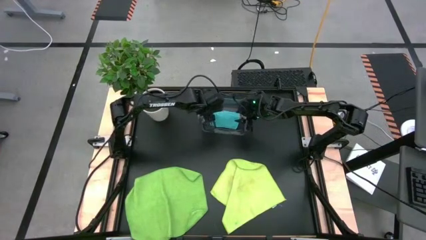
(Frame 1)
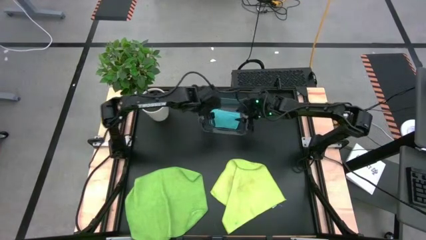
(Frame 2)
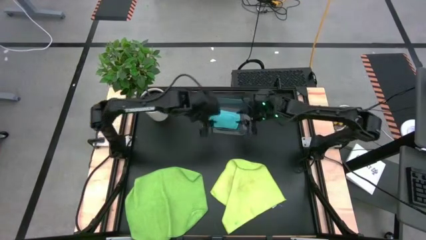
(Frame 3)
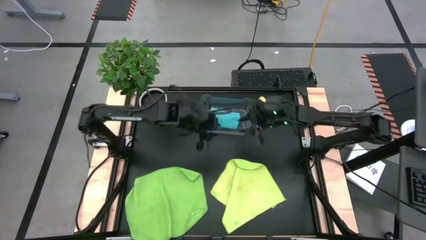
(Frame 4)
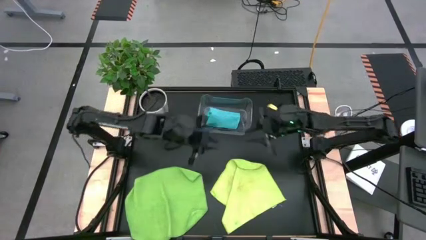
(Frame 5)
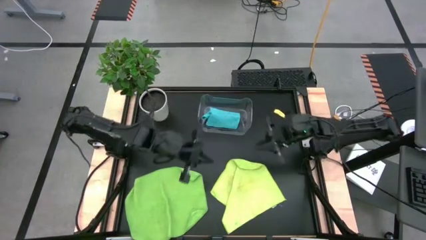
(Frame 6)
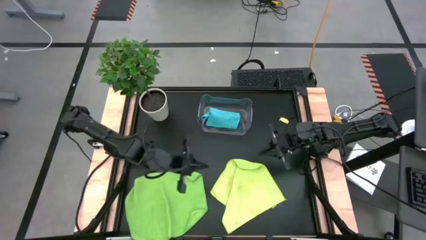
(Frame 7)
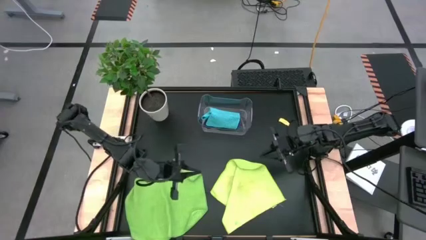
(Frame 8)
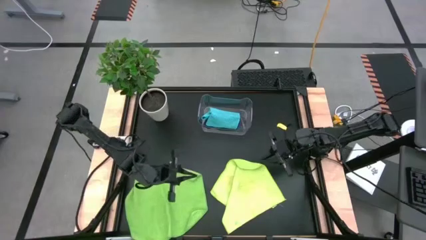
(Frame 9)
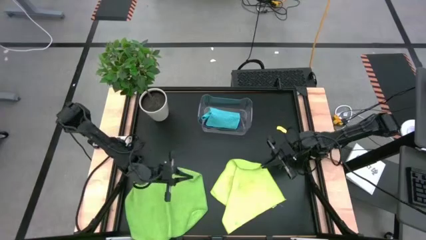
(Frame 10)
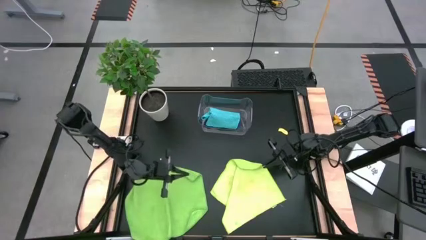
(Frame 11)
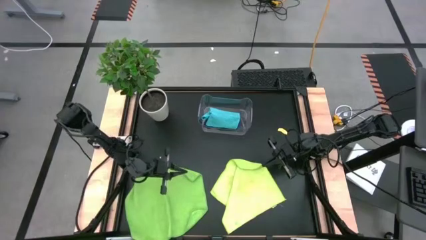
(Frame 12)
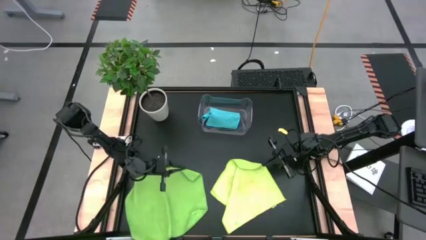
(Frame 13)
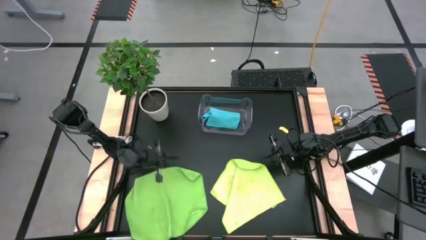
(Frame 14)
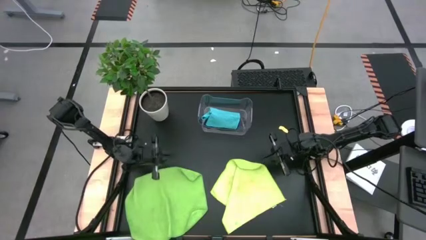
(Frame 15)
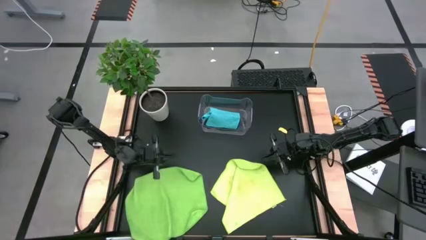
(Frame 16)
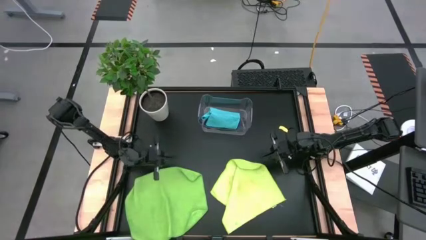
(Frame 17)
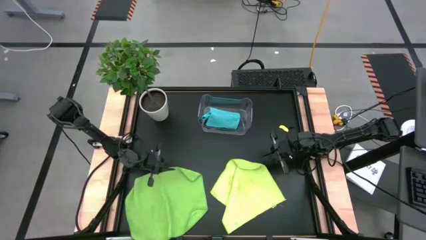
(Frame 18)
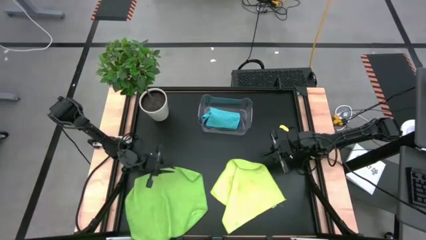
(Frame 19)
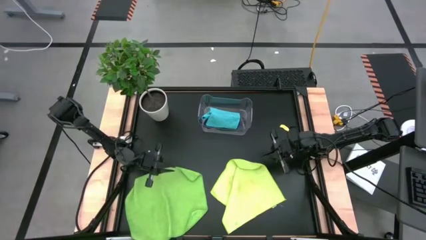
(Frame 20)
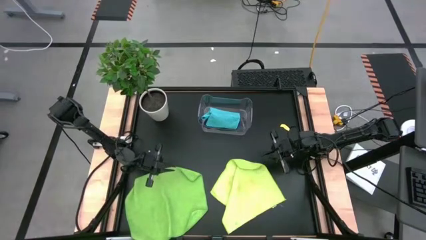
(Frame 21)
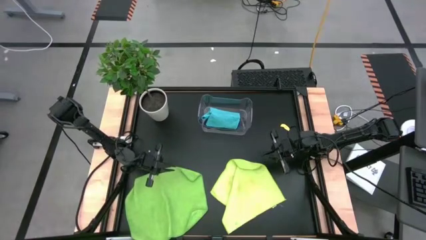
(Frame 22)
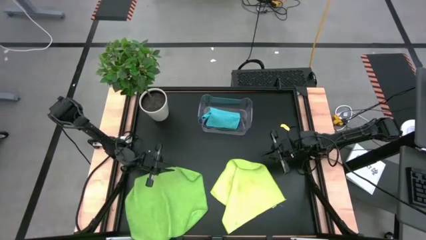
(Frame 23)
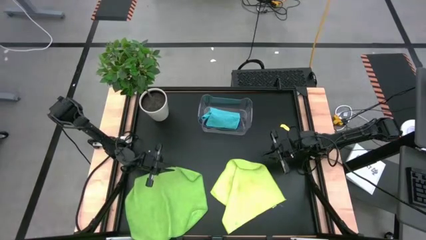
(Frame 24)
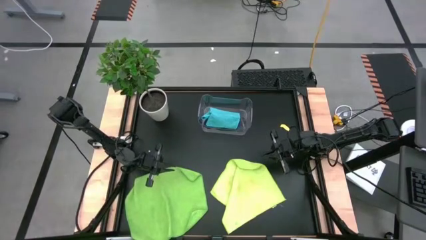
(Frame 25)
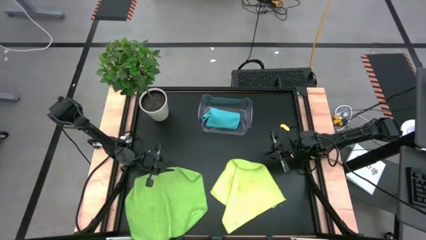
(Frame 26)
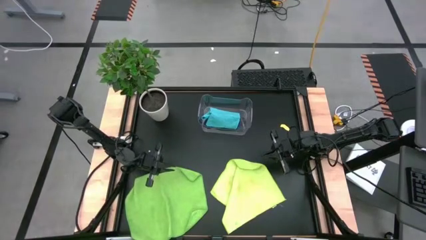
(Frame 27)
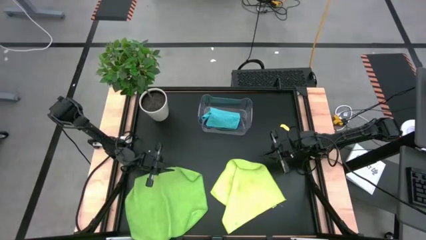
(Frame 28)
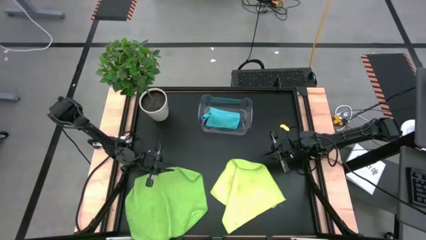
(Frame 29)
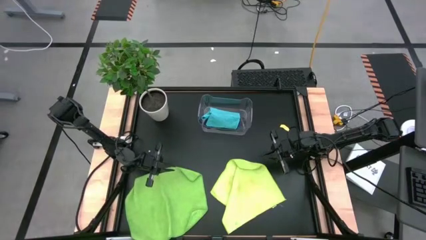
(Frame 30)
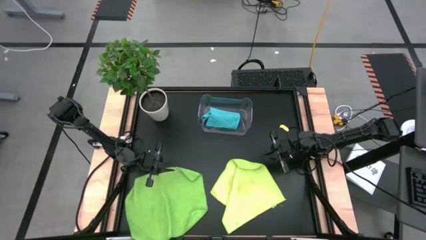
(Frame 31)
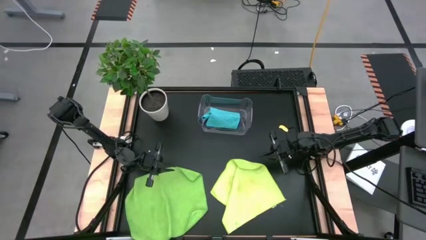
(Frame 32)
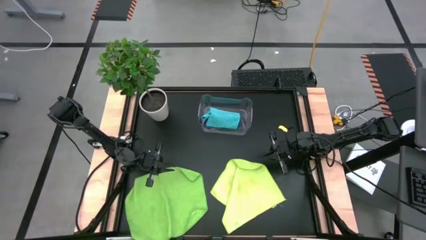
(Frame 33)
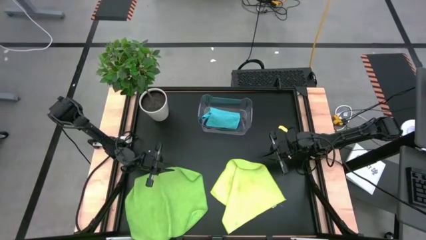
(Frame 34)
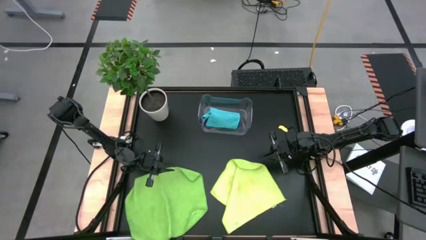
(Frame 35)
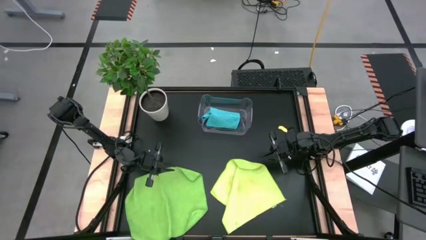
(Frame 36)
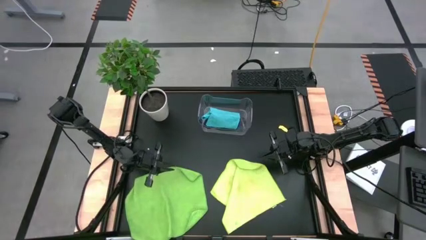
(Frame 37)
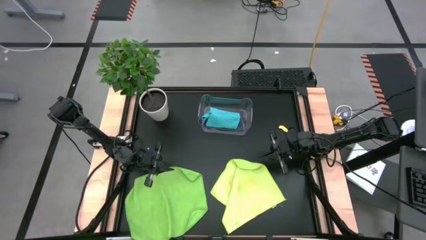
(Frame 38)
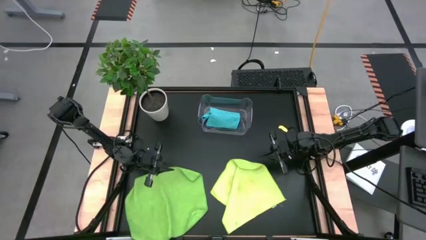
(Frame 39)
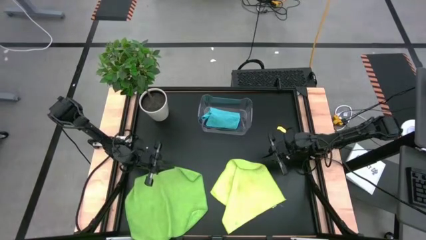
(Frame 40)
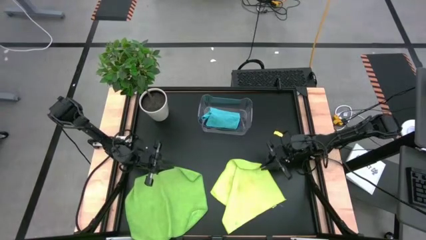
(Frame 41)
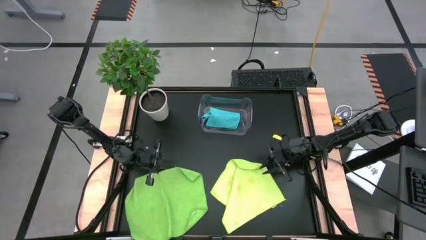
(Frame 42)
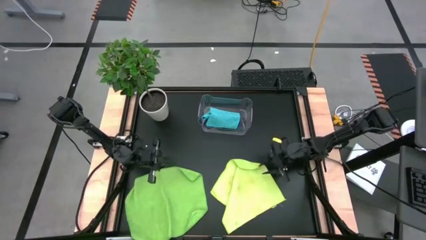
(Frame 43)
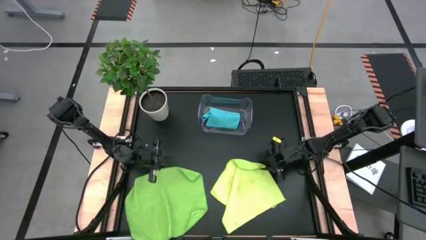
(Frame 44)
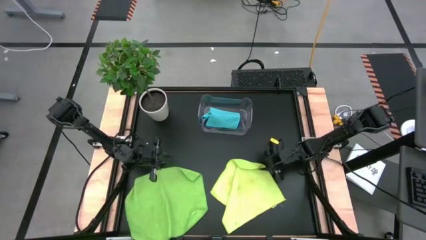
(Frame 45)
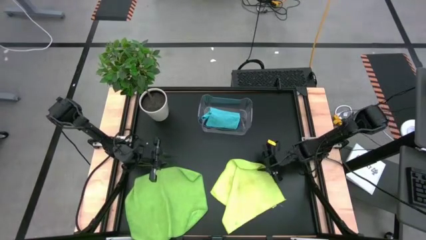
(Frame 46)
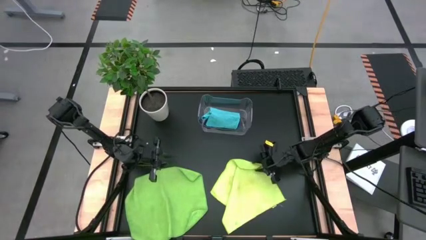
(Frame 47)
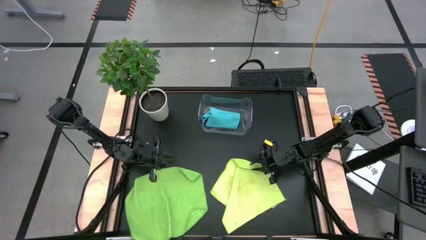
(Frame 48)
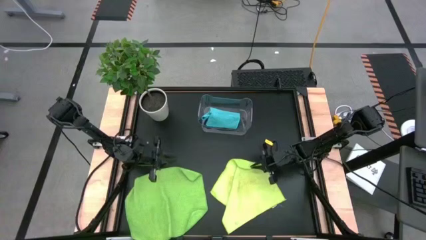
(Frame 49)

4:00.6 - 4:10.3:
Task: Fold microfiber towels
Fold the light green towel

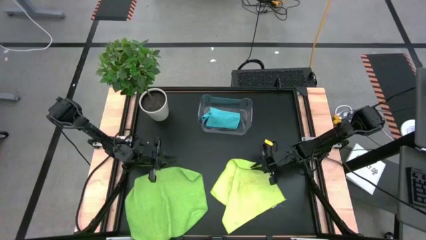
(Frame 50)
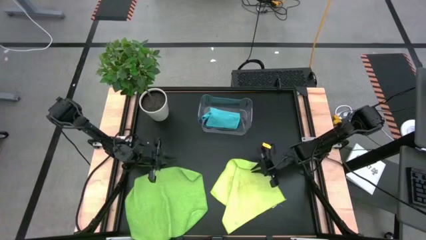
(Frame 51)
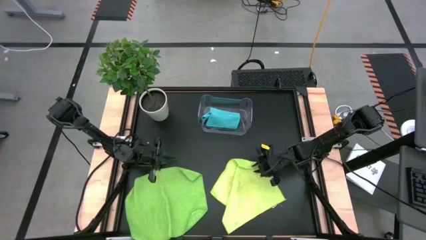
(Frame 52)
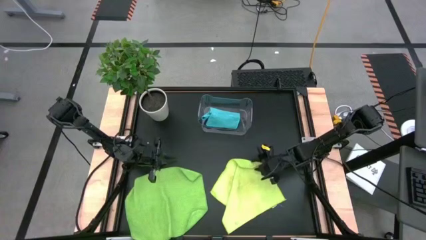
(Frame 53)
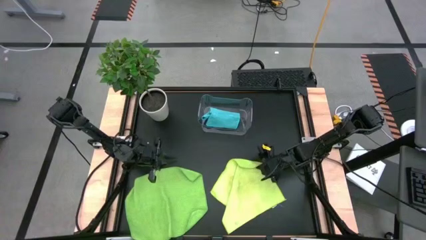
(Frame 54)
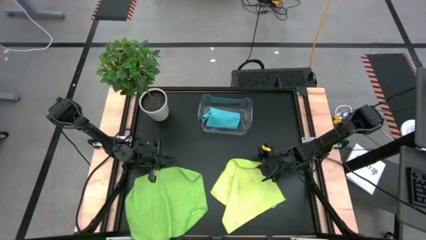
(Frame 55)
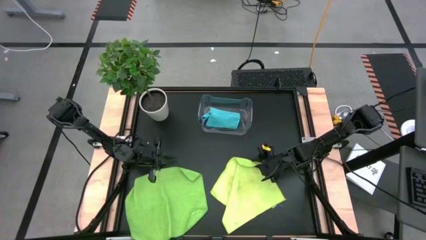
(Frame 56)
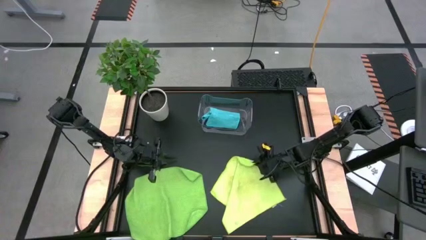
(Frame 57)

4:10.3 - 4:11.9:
Fold the light green towel

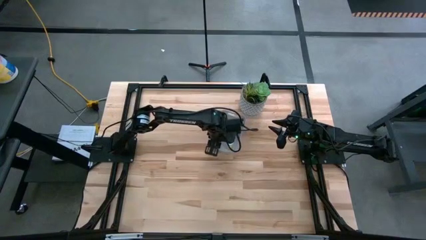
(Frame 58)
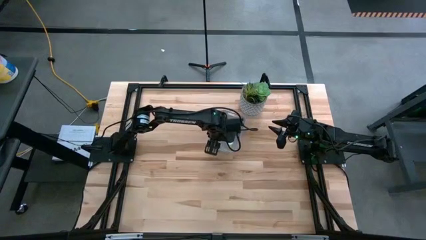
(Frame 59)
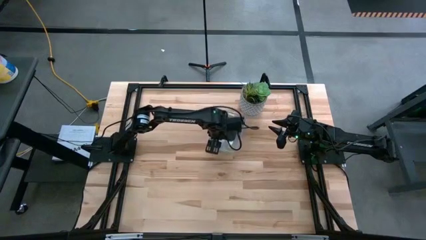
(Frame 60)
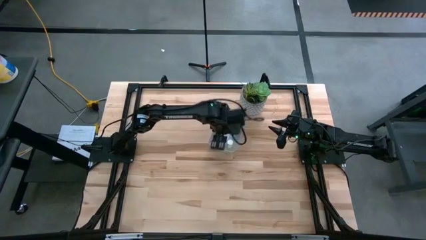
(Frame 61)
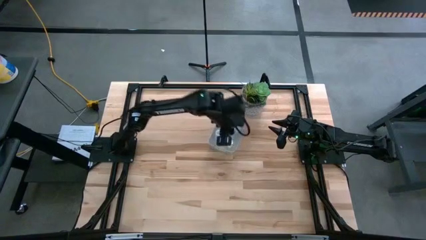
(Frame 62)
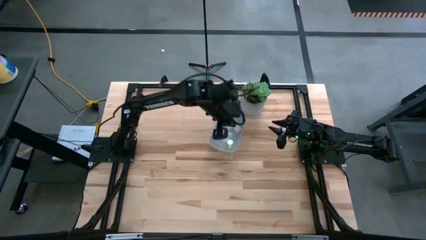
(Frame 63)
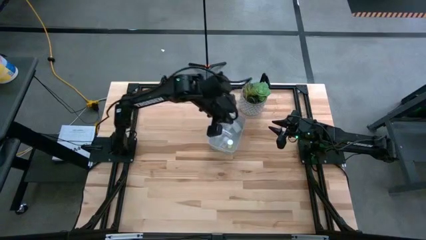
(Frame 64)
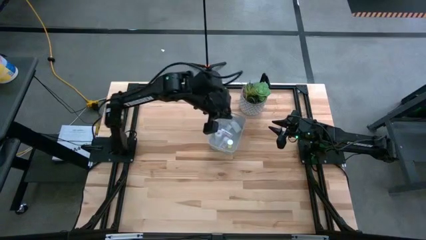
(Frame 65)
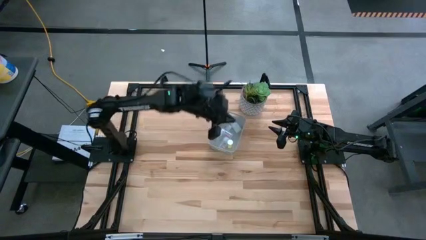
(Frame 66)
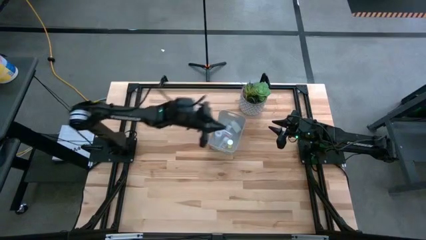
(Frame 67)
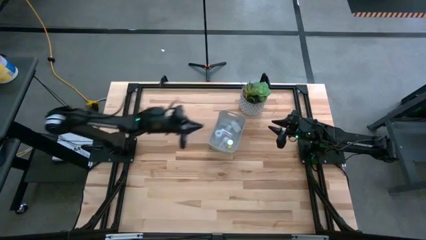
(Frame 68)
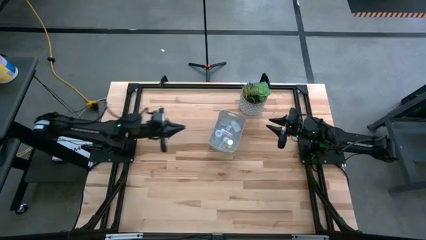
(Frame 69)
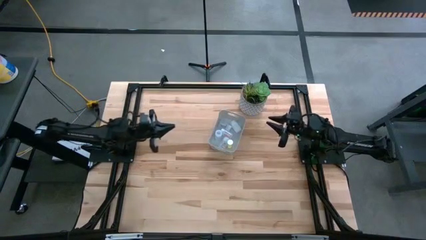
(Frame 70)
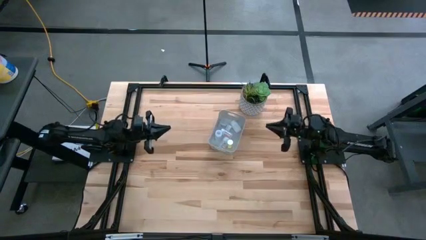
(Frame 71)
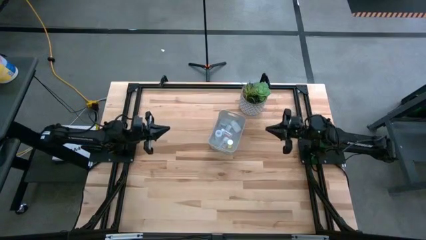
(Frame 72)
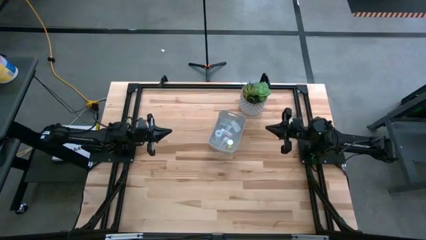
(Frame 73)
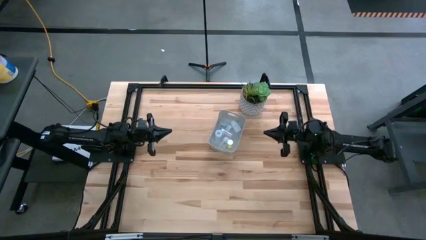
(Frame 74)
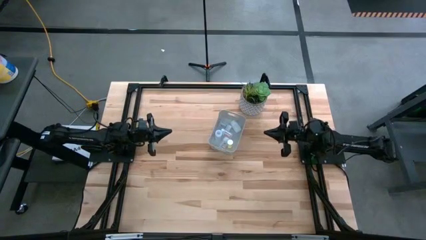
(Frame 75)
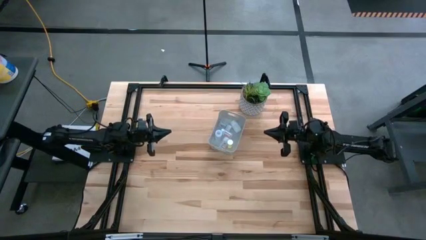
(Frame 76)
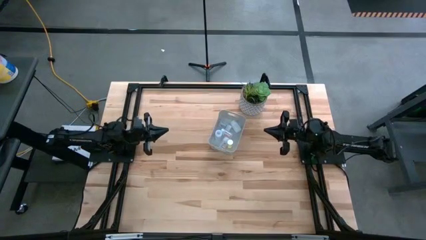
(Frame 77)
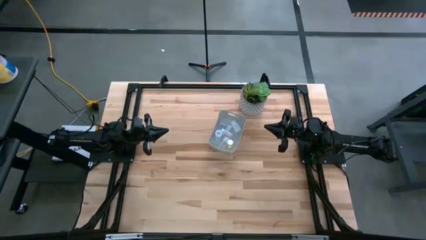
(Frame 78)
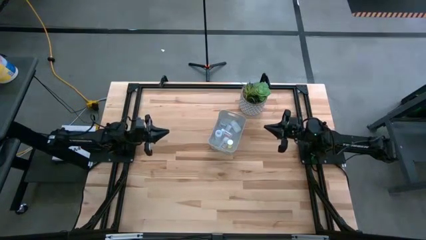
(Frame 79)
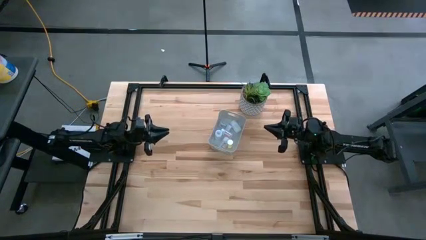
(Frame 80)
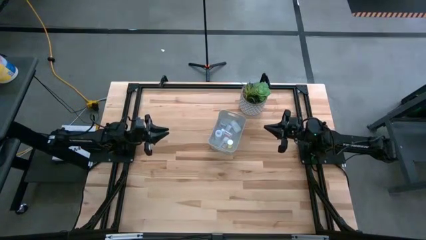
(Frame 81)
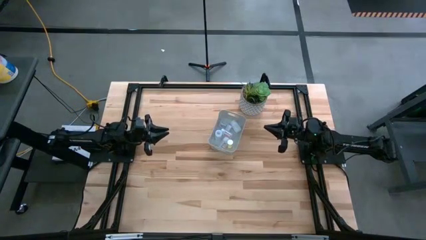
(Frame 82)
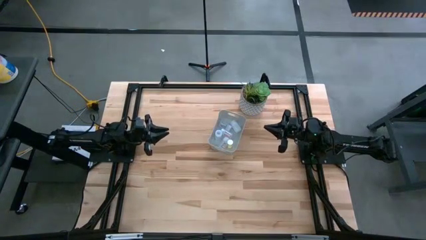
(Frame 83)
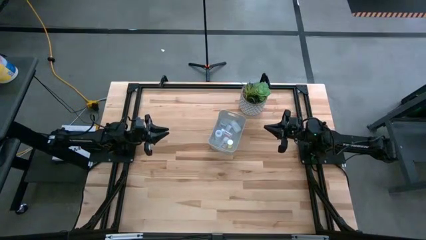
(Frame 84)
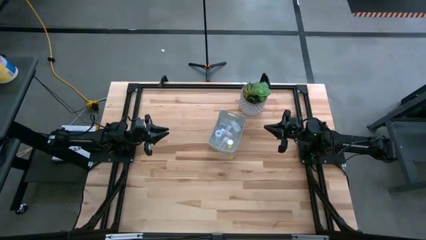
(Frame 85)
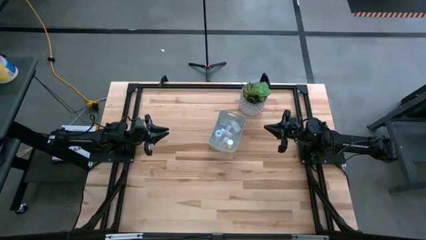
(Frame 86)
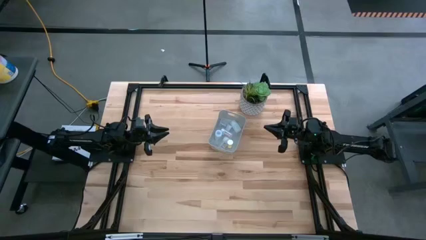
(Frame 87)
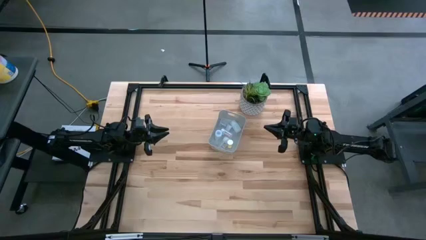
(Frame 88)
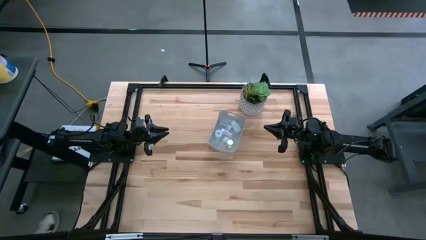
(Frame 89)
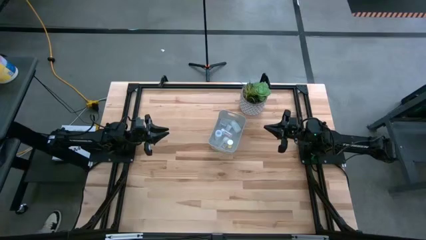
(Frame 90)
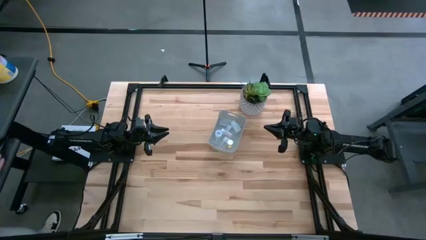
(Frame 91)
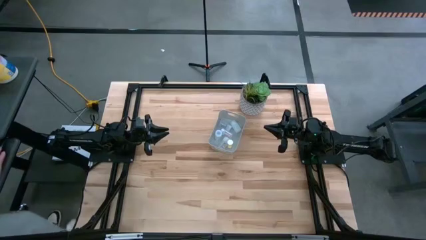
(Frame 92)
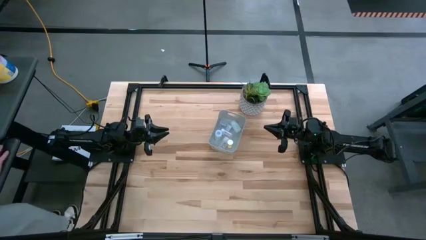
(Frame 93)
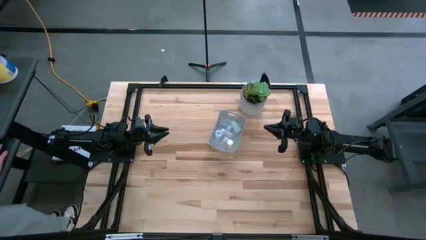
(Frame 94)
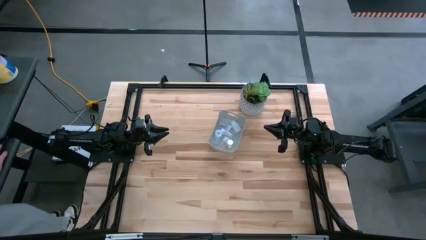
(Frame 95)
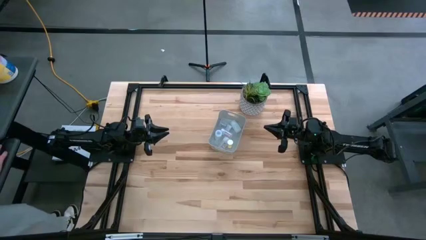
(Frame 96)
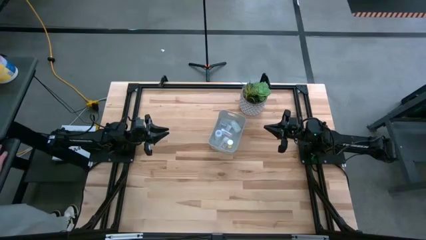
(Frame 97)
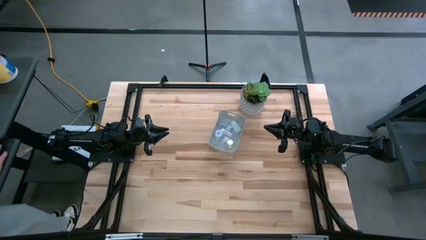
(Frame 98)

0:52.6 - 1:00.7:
Task: Pick and place pill bottles into a basket
Return to Home Position
